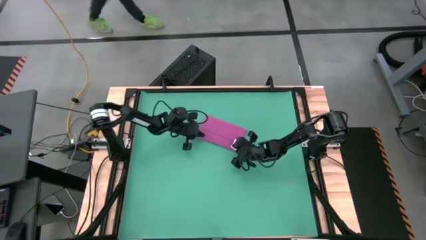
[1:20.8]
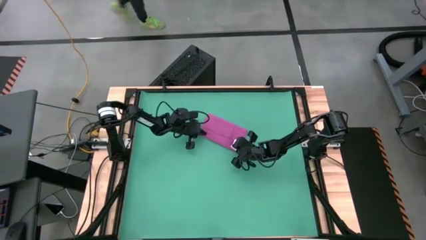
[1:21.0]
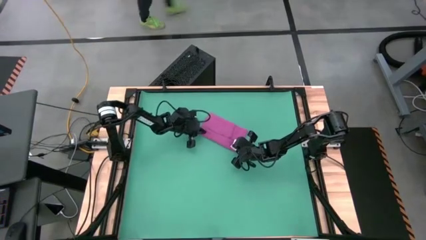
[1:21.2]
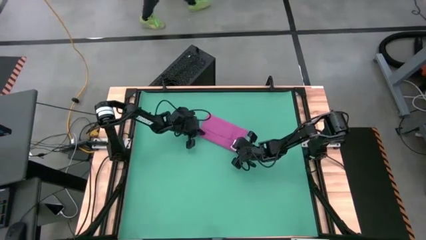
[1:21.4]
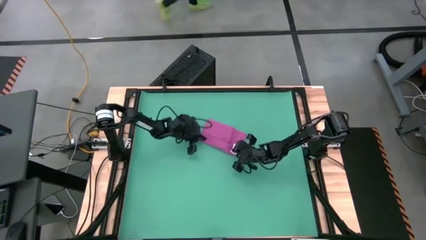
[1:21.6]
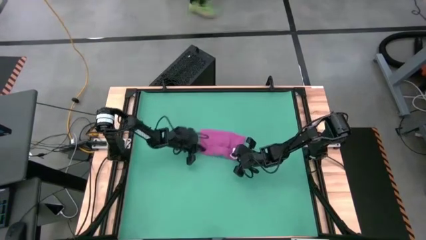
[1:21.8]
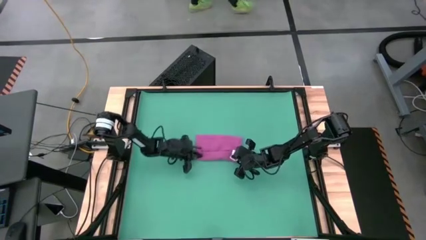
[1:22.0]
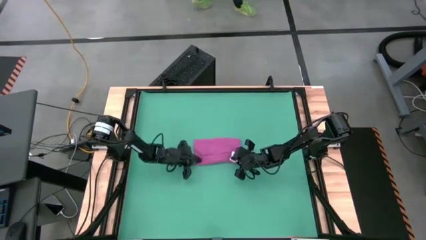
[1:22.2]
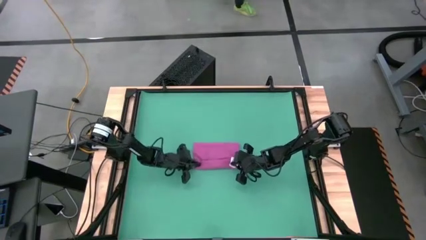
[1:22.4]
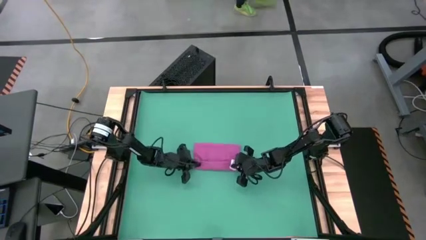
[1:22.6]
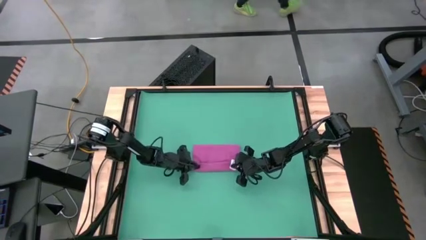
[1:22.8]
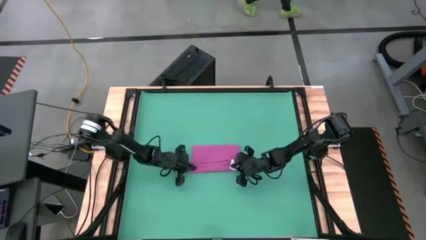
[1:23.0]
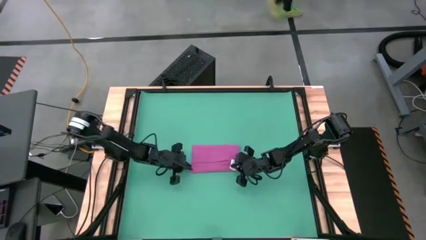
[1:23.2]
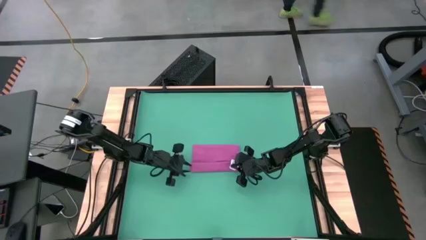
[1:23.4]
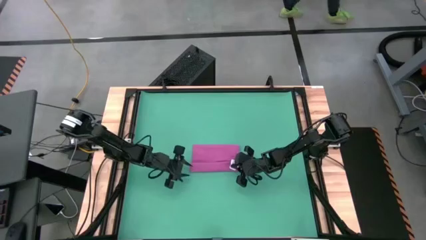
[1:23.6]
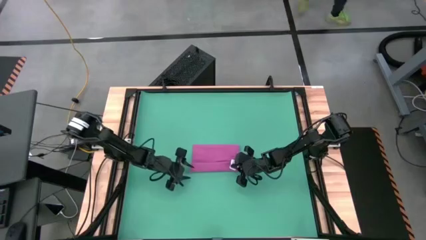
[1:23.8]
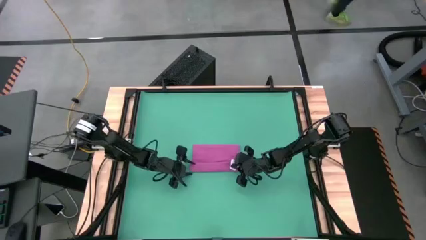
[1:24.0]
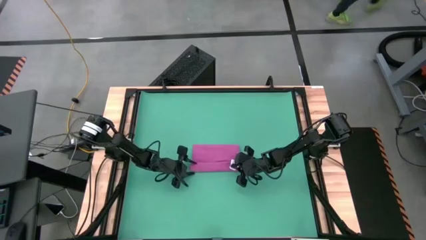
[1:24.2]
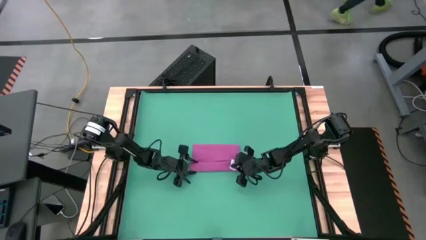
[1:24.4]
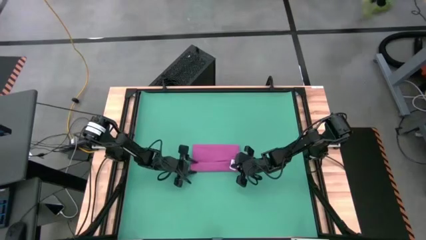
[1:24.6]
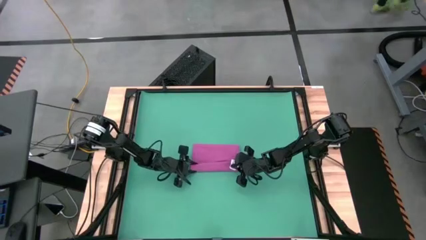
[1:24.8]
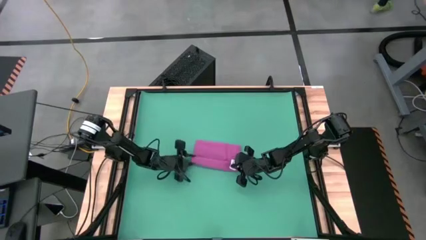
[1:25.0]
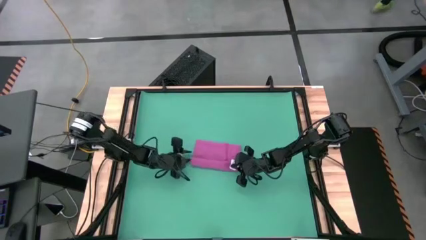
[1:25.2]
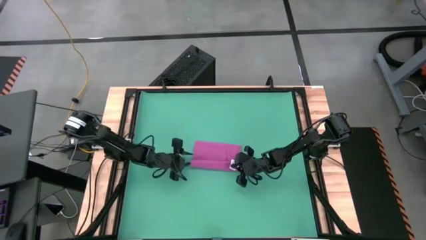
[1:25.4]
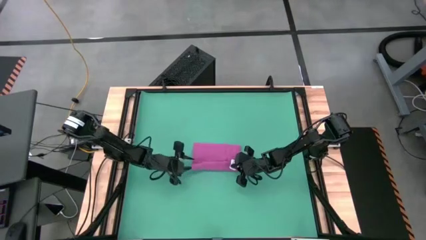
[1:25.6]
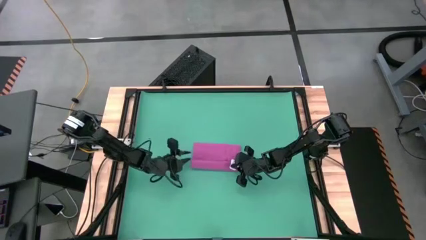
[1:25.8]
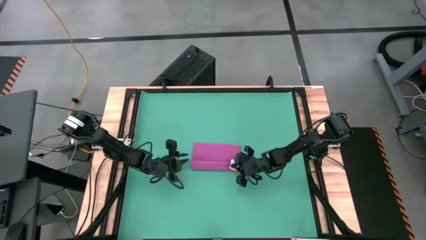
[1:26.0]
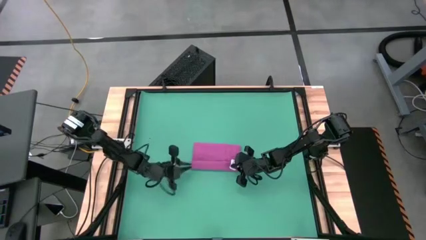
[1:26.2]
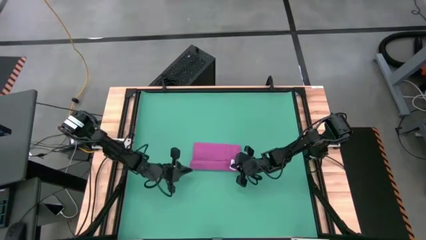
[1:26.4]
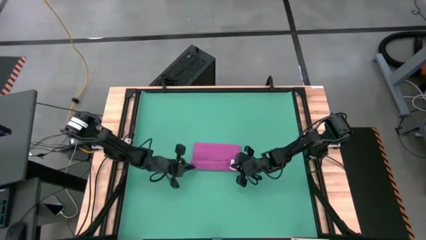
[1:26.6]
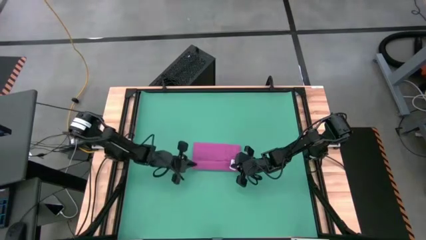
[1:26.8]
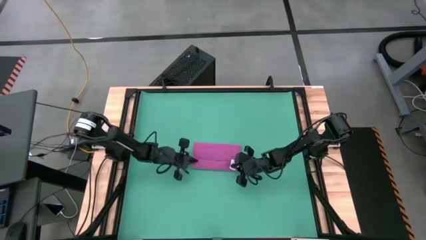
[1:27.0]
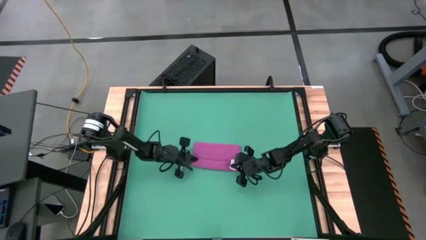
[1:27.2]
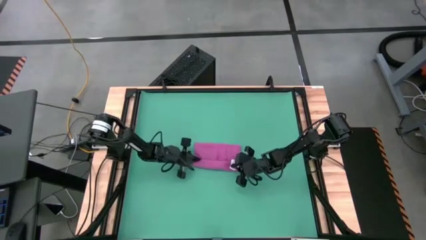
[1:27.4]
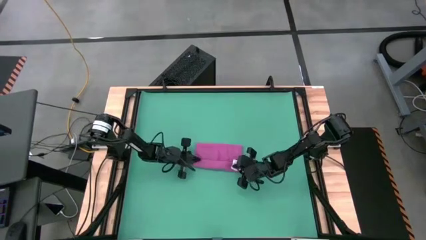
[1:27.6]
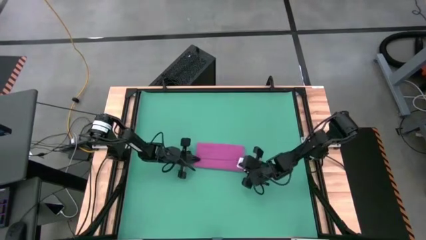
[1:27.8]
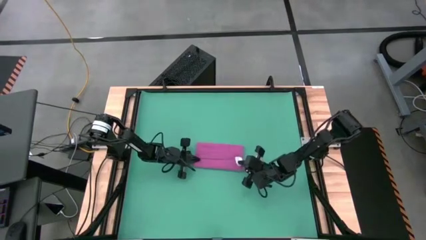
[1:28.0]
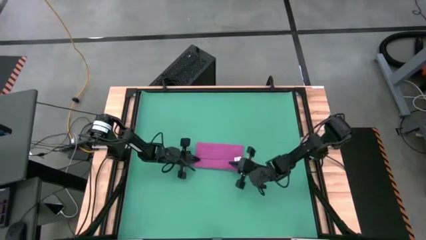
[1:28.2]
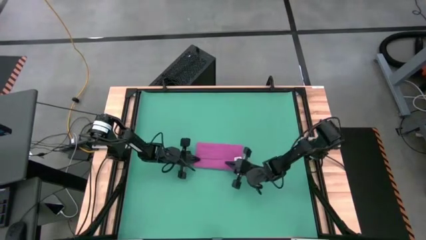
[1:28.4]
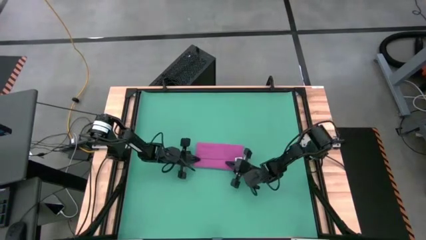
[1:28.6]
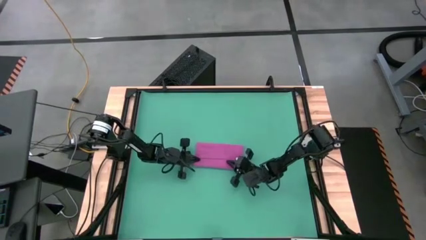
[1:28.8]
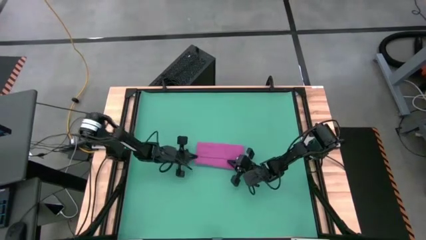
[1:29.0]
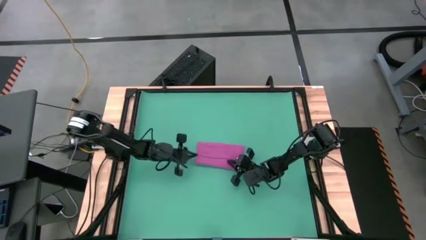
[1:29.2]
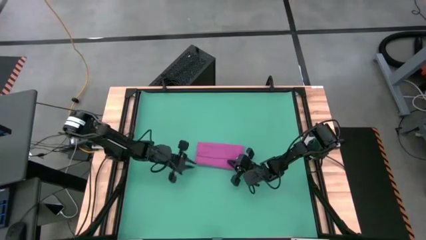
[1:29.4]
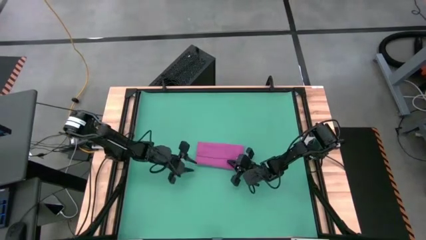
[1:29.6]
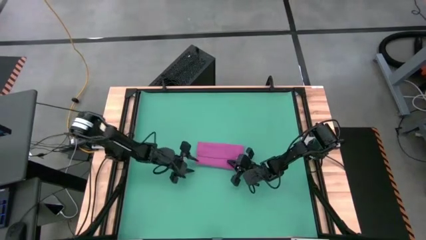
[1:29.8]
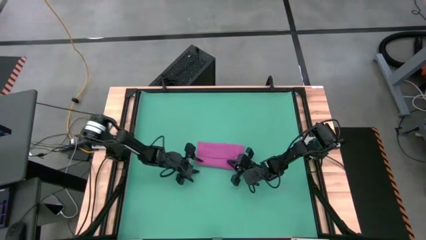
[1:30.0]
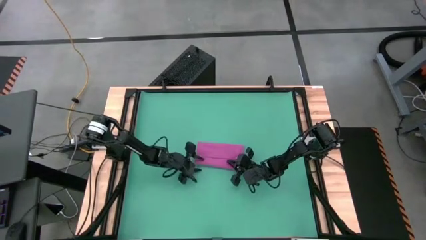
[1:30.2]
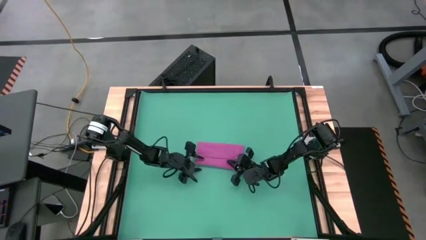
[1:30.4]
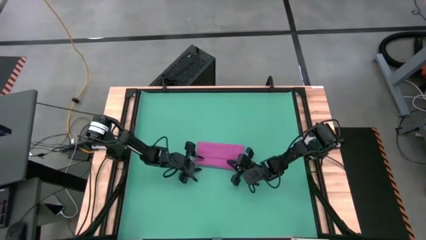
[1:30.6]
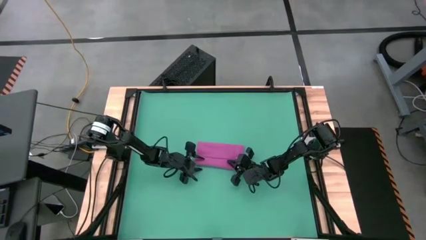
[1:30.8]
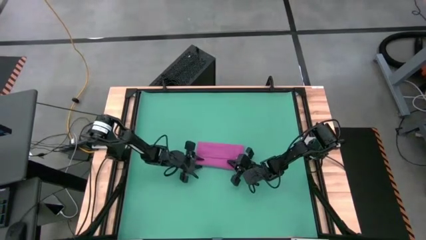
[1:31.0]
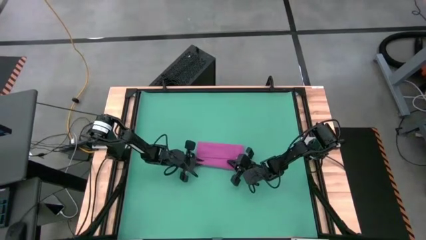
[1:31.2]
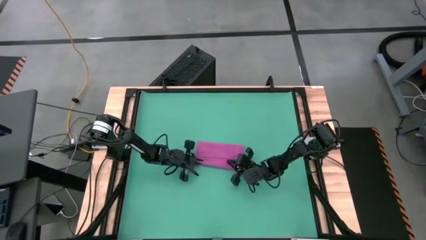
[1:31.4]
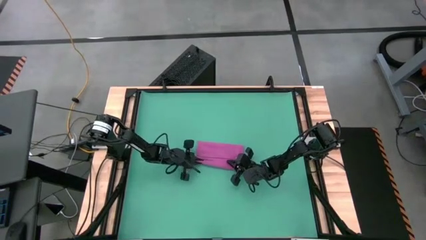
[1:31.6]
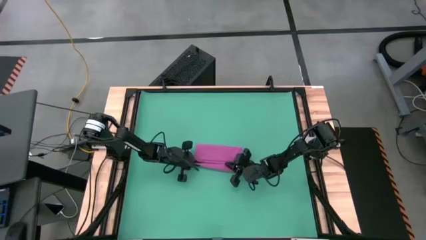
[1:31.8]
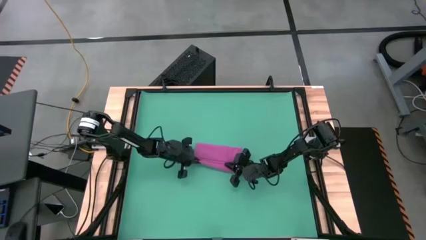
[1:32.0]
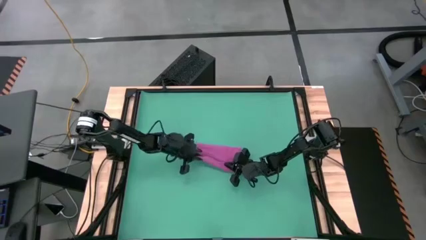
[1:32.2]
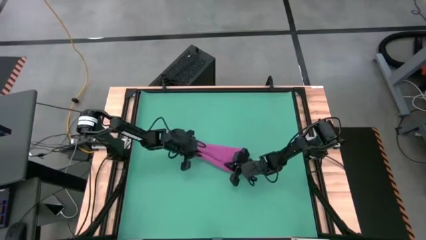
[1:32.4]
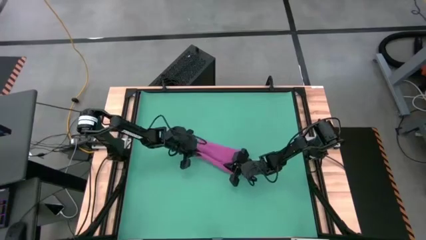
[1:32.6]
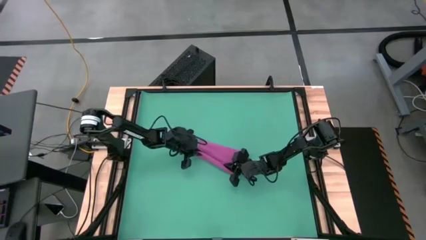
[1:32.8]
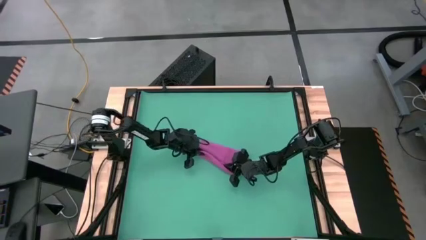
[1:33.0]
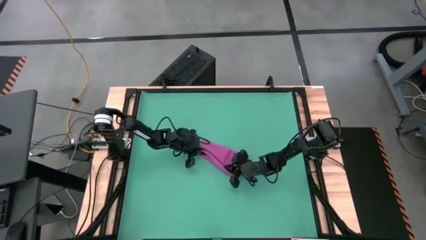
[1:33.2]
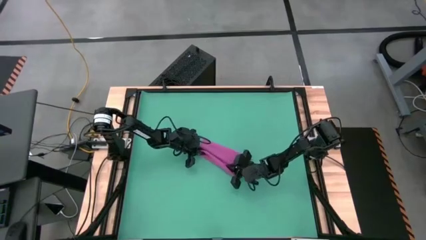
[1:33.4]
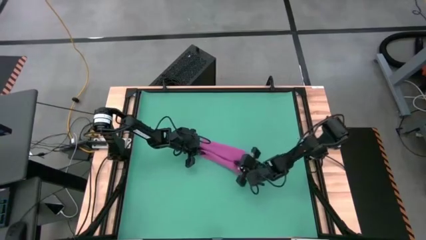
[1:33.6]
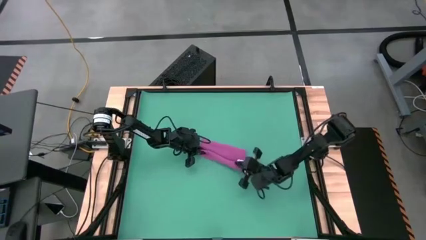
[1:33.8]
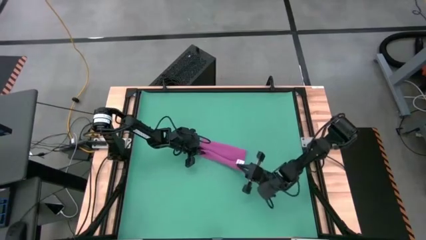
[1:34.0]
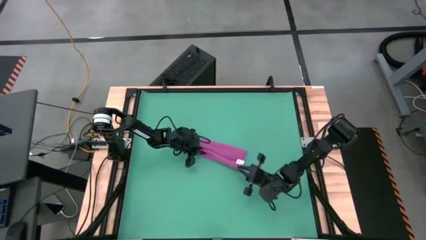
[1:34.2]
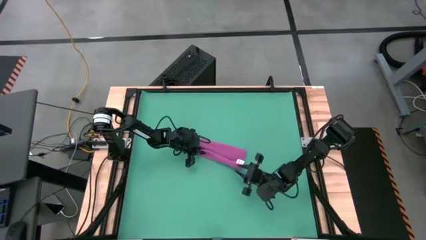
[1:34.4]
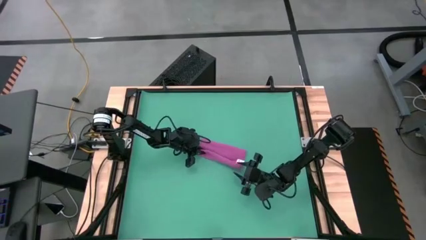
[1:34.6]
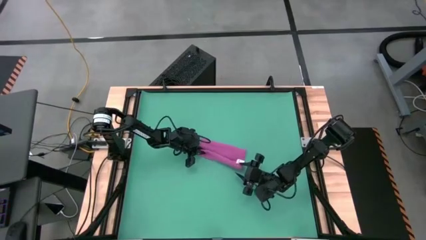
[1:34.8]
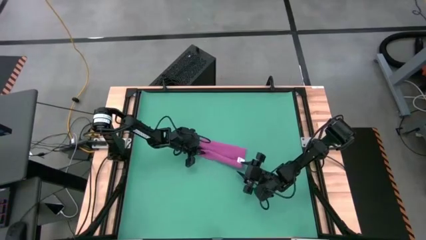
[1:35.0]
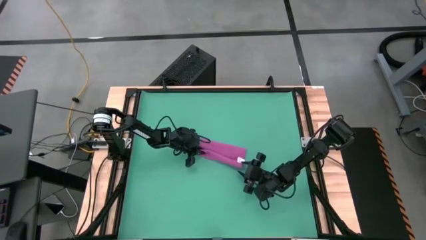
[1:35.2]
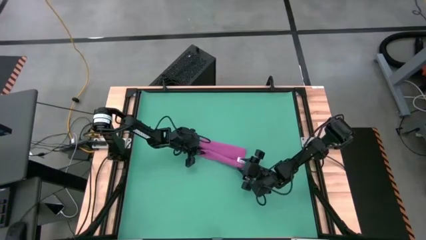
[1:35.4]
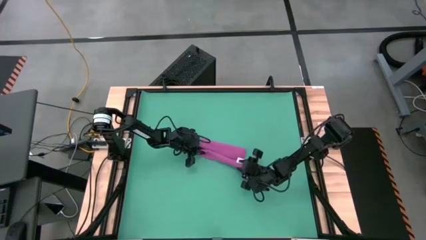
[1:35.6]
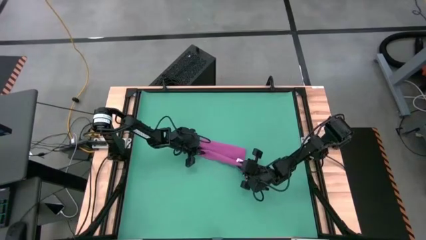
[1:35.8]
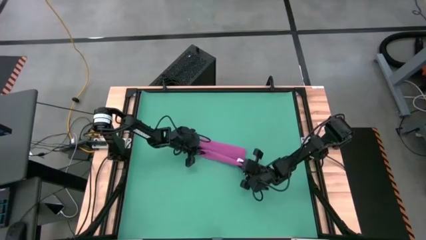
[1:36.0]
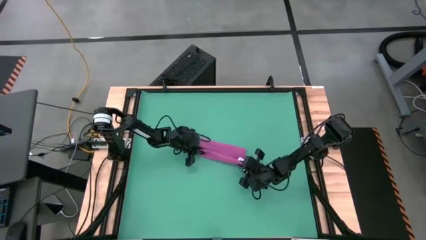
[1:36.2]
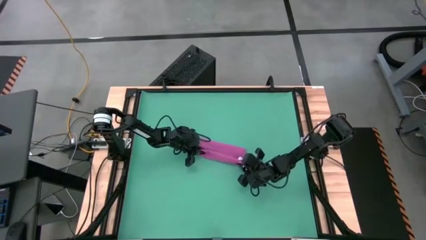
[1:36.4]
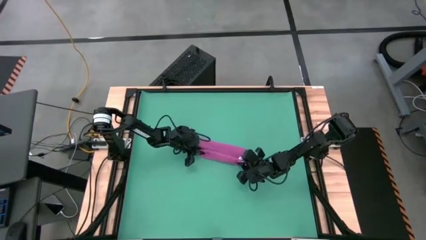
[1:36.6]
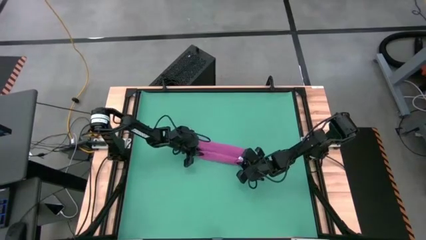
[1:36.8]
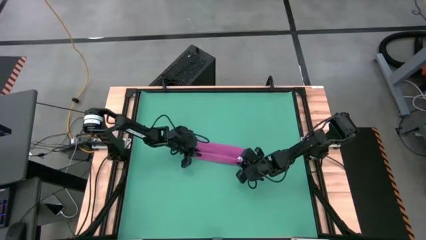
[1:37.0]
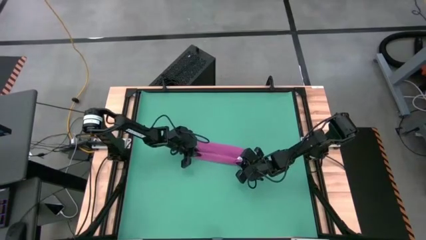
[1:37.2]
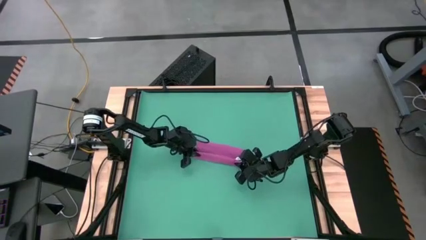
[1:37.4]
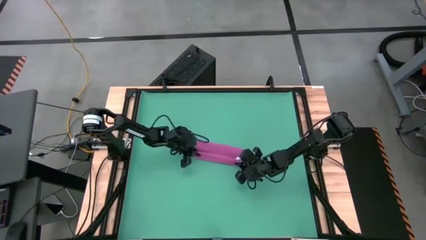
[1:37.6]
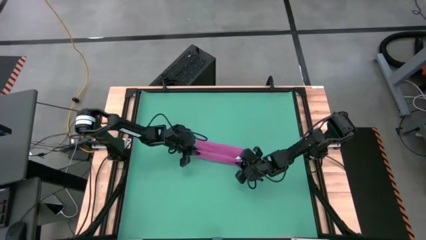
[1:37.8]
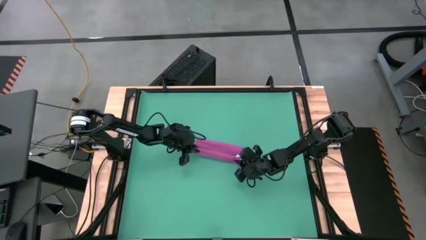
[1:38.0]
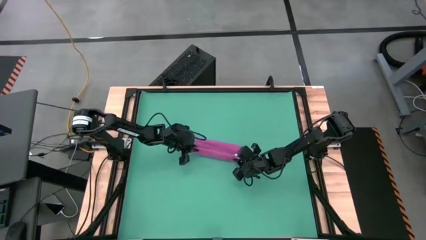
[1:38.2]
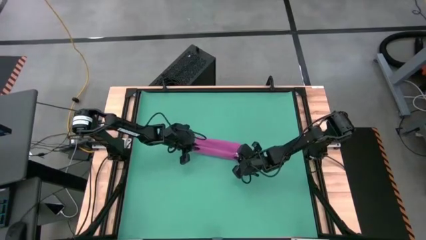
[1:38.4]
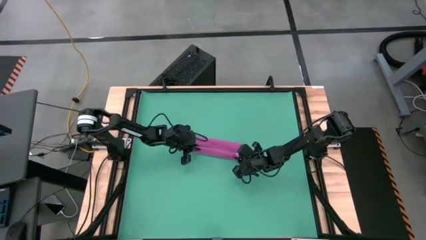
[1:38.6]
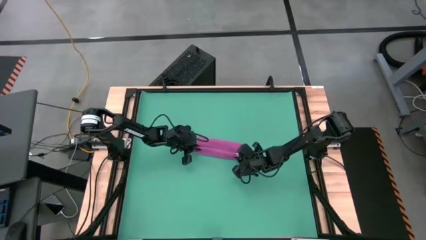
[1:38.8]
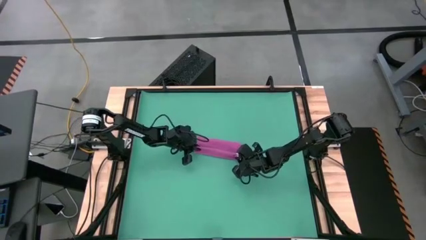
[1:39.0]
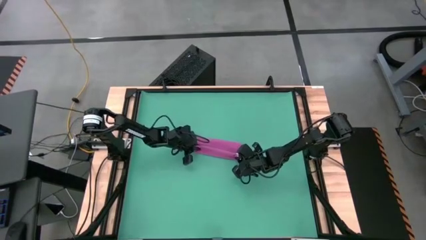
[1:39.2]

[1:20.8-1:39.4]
Task: Roll towel into tight, uniform cylinder
Roll the pink towel
